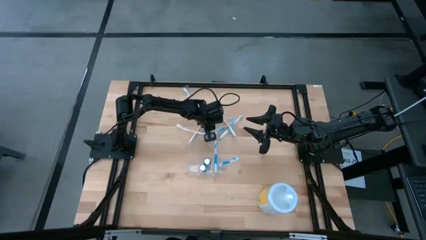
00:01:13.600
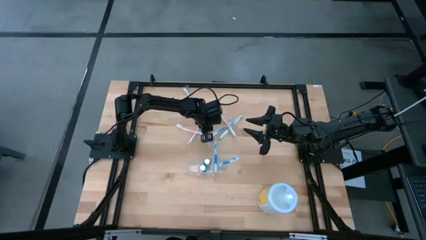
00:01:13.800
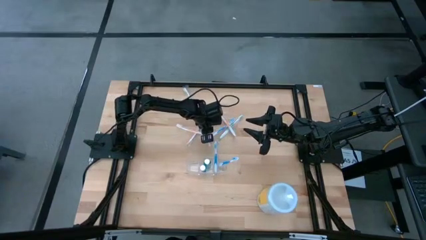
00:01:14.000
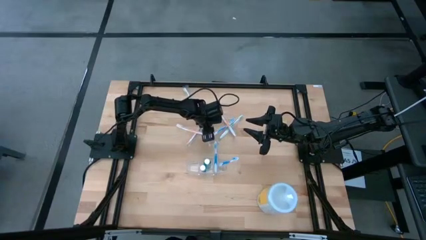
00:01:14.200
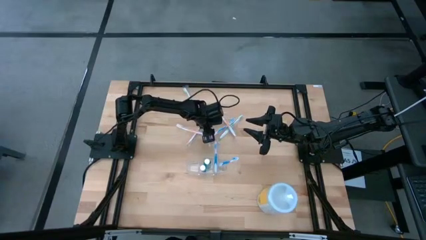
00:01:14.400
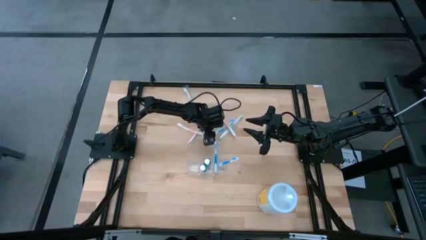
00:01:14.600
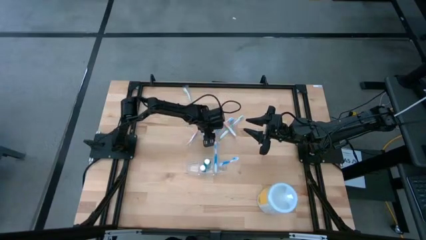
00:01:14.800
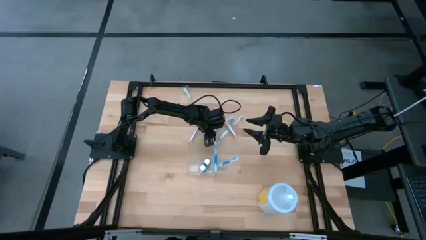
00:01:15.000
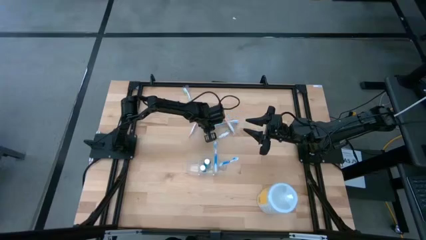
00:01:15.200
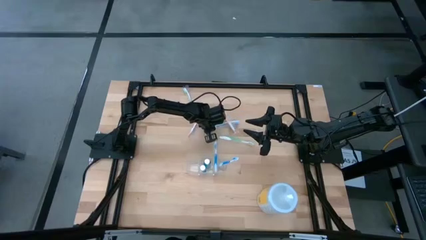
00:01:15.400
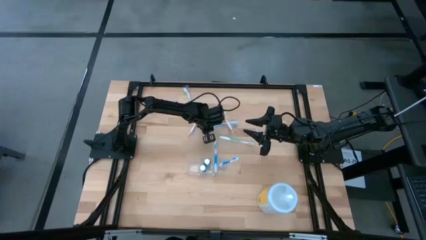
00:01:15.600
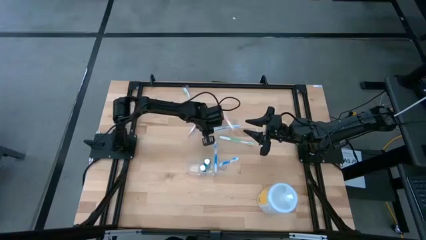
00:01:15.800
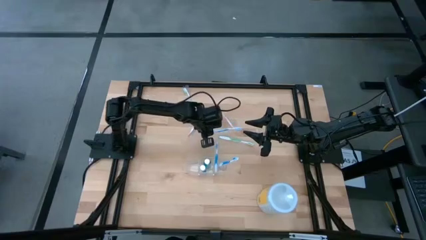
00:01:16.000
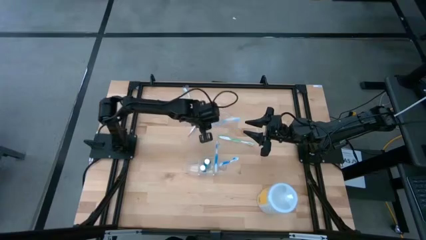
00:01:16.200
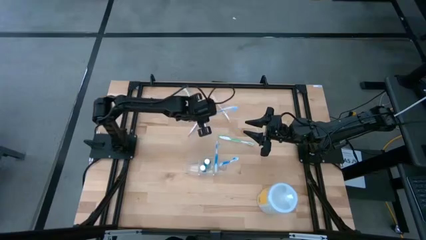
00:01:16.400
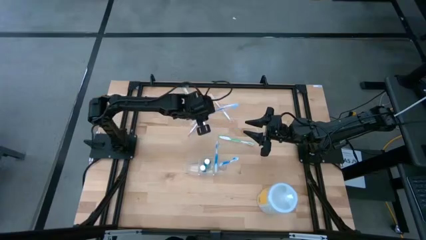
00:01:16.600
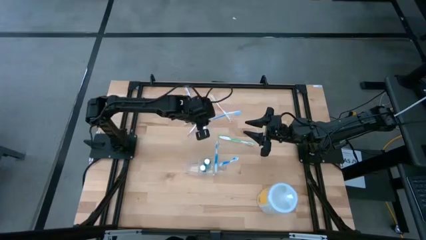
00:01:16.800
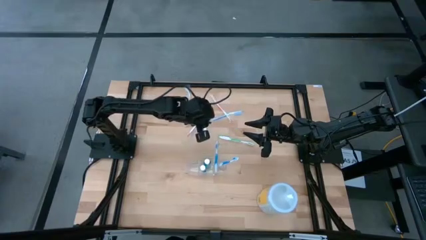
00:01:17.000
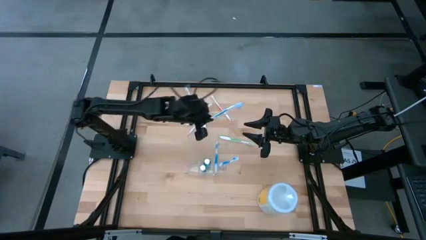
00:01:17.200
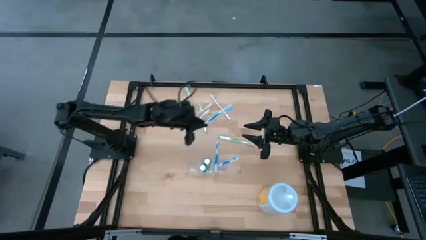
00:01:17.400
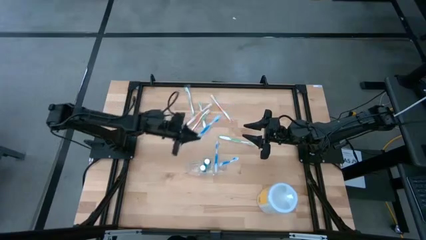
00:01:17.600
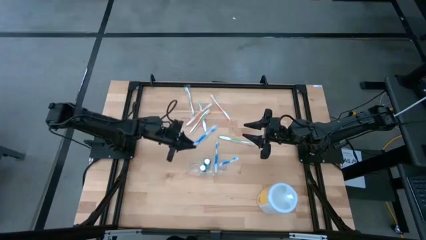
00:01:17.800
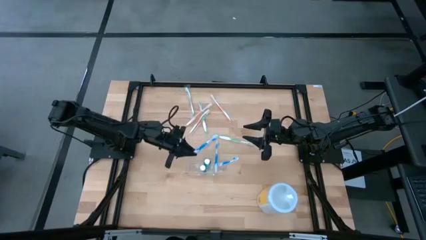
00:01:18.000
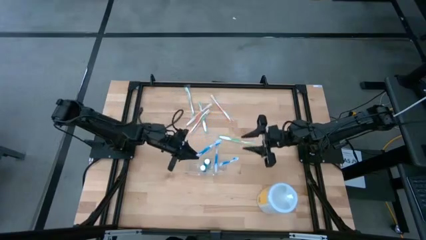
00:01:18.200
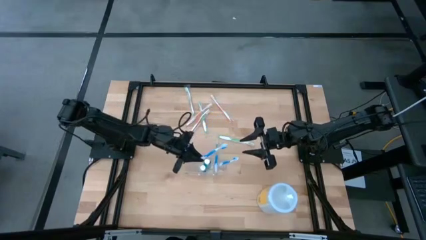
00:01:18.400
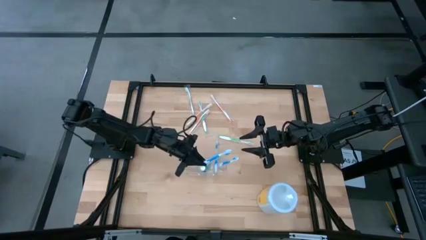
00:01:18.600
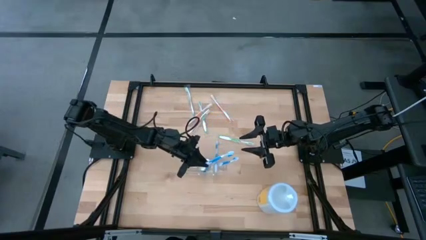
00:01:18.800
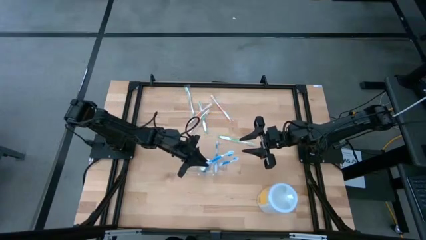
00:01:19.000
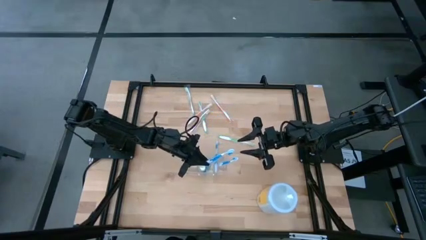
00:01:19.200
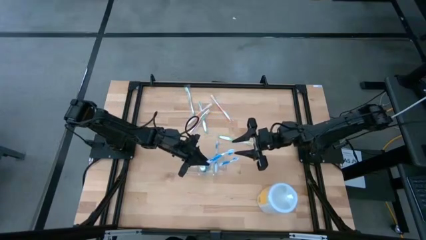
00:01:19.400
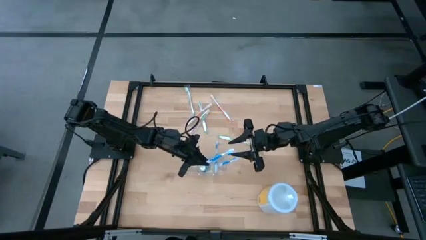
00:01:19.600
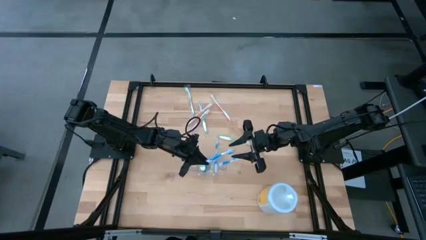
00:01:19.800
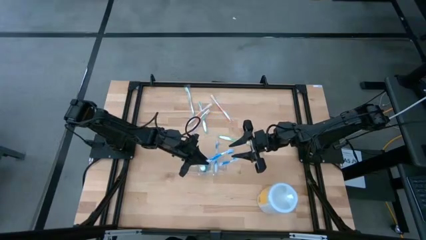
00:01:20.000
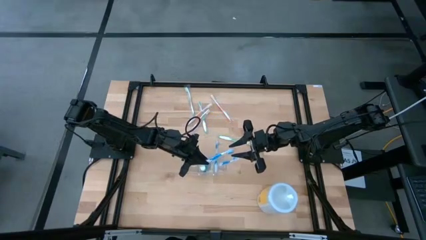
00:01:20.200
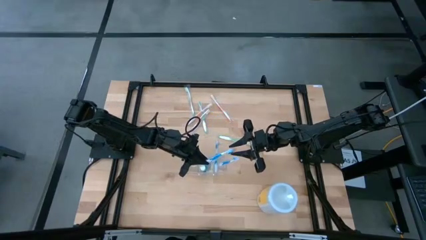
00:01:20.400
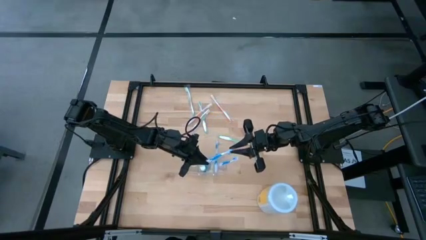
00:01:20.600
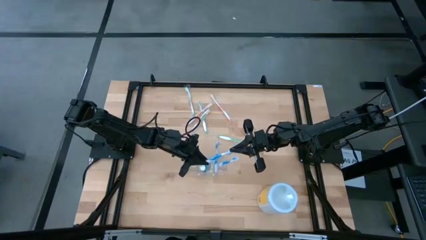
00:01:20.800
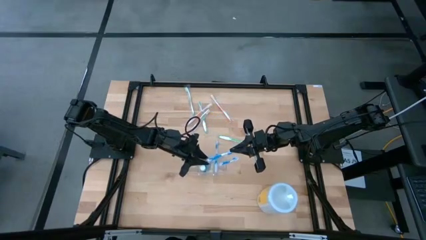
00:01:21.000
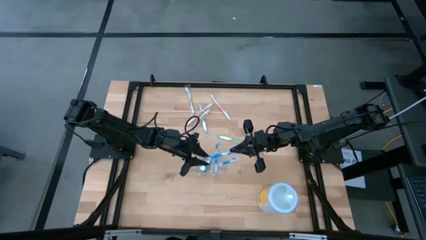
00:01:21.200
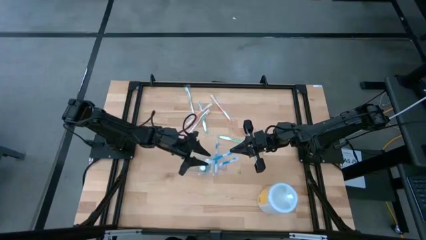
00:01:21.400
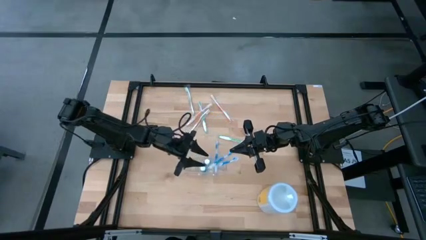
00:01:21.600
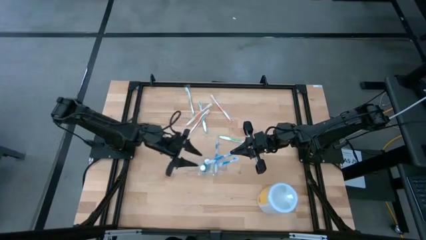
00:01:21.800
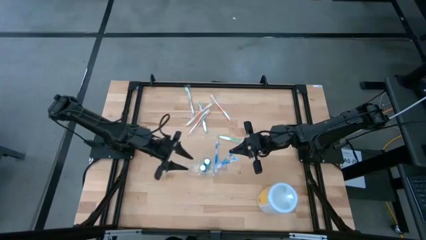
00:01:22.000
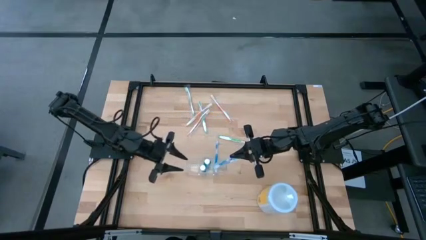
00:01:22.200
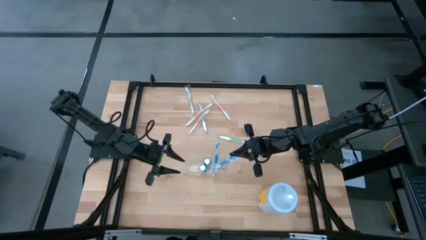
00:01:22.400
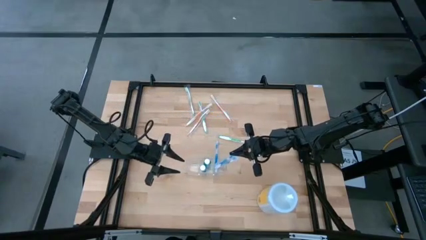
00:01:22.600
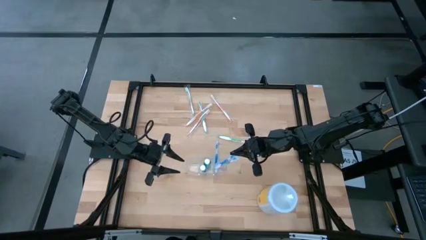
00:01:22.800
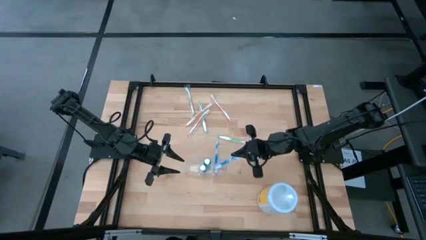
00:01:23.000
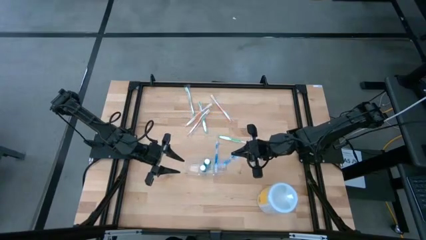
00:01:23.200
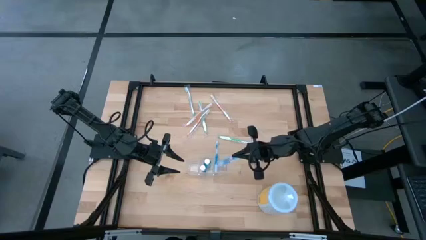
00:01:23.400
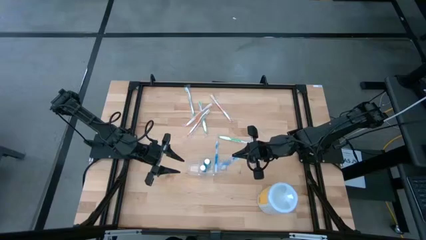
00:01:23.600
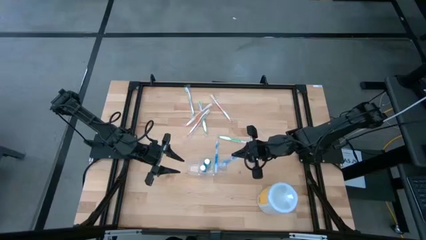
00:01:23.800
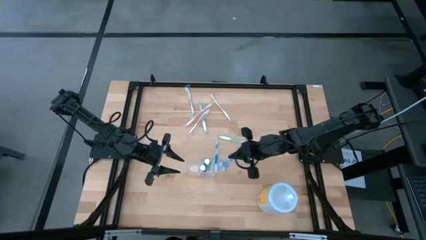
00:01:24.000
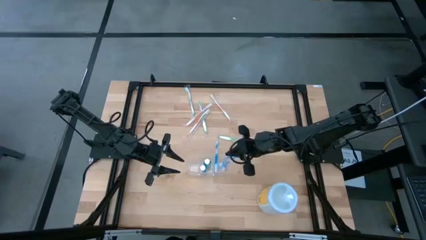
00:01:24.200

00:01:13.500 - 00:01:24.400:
Task: Pick & Place toothbrushing station
Put the blue toothbrush into the transparent organizer

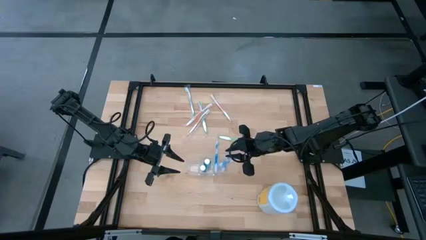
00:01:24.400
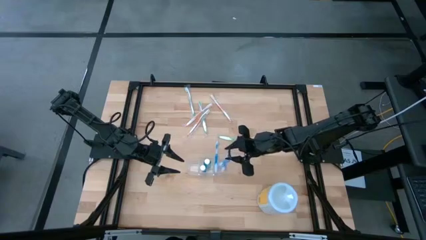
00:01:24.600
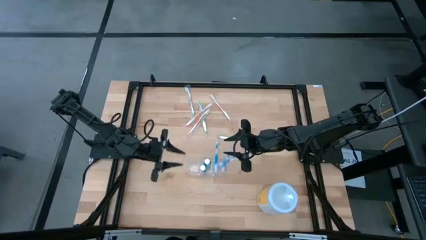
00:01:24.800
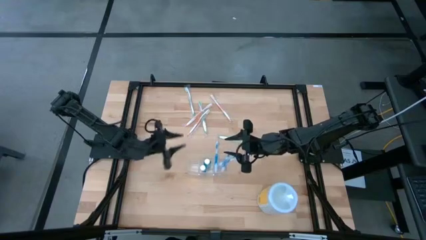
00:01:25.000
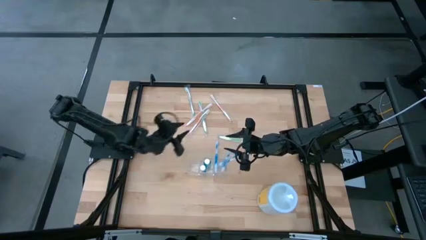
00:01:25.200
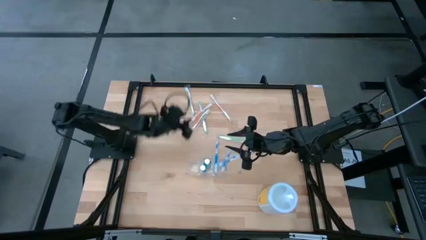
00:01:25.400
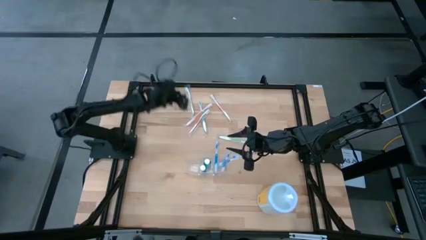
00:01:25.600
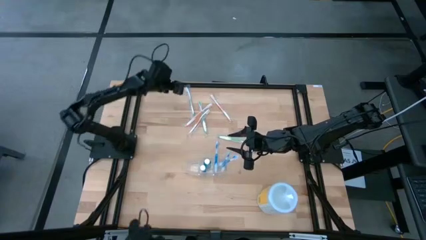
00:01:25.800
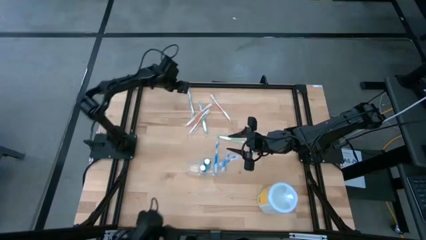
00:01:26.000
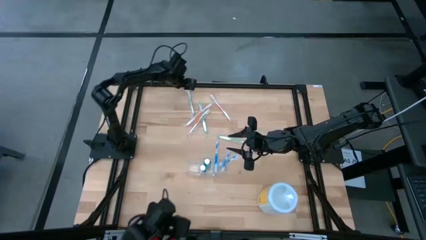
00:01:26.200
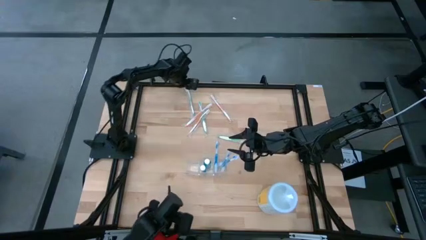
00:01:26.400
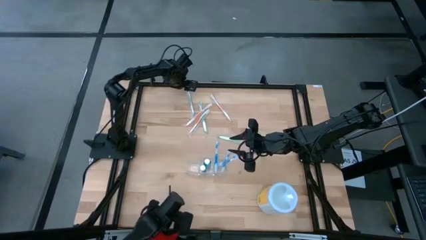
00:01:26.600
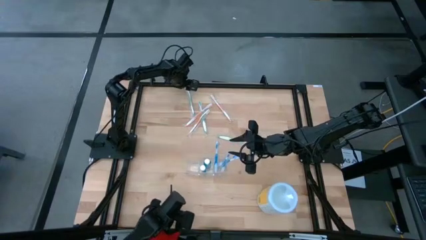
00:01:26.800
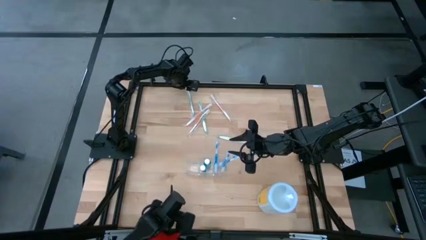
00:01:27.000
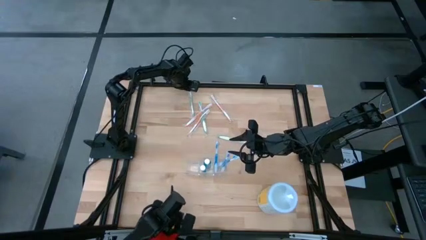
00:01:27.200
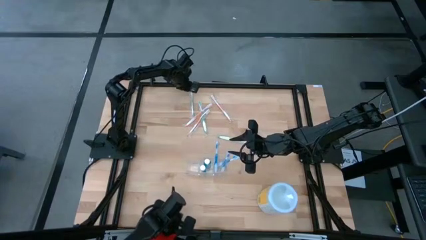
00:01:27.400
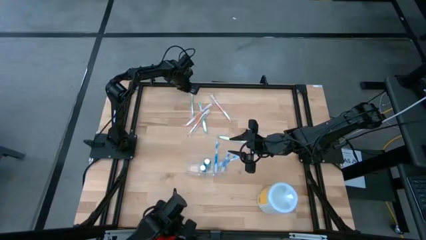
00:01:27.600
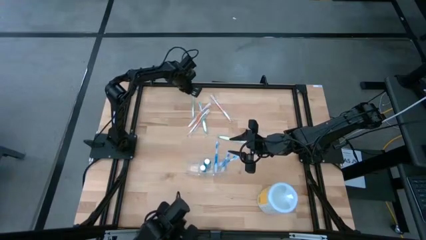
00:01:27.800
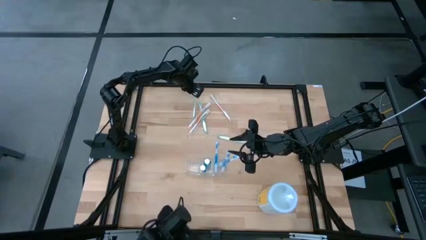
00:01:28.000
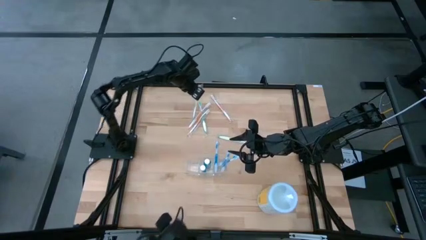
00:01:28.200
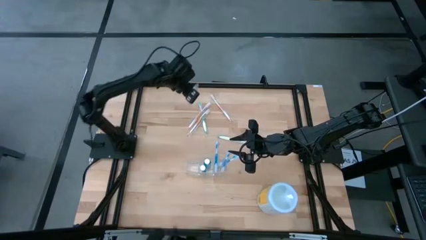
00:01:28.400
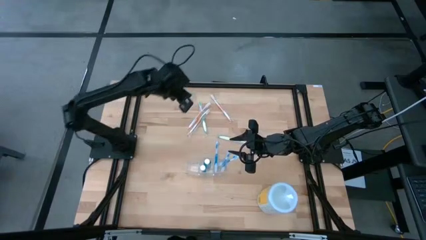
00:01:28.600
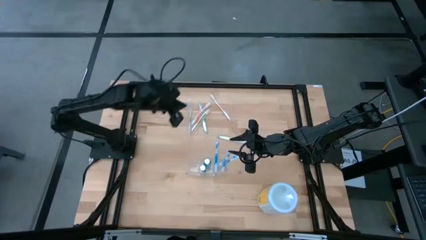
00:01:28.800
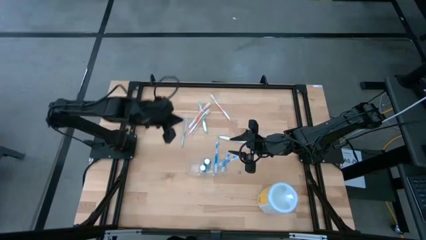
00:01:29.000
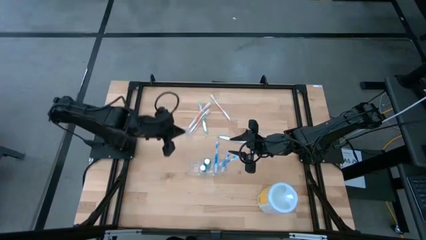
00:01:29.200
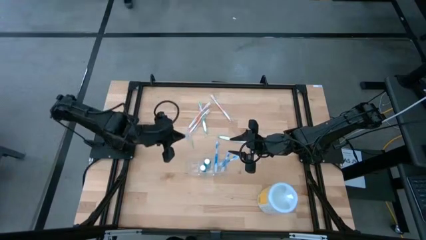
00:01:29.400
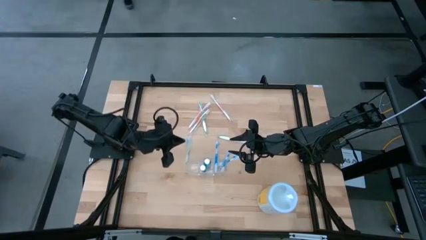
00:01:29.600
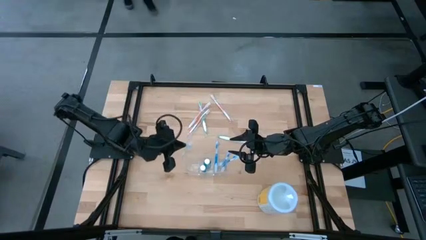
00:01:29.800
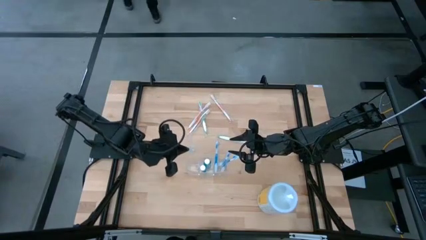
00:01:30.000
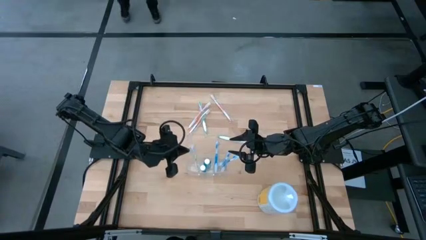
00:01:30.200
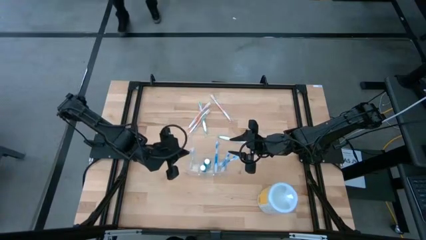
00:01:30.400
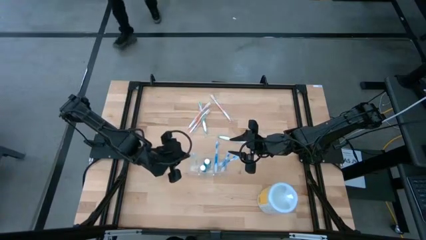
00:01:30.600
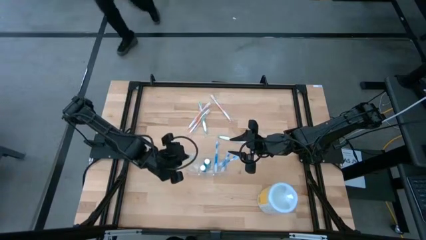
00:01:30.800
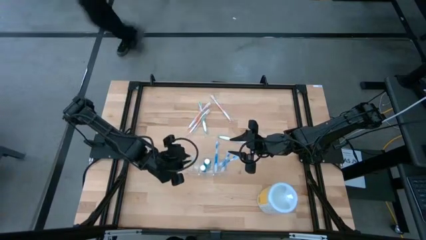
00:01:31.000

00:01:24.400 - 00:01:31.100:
Put the green toothbrush into the transparent organizer
